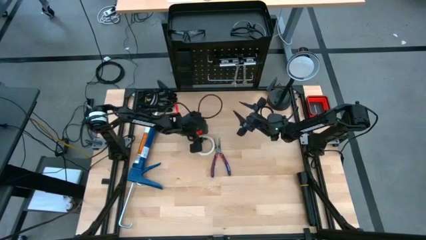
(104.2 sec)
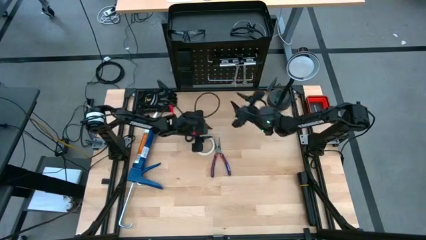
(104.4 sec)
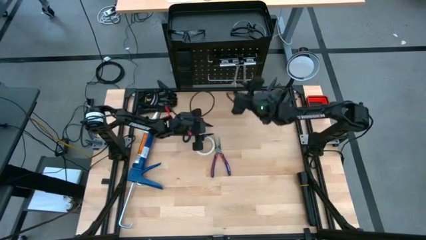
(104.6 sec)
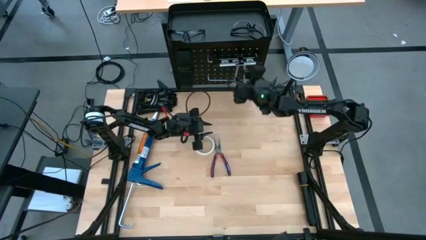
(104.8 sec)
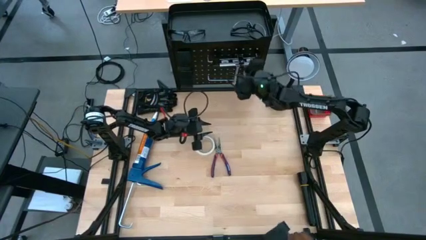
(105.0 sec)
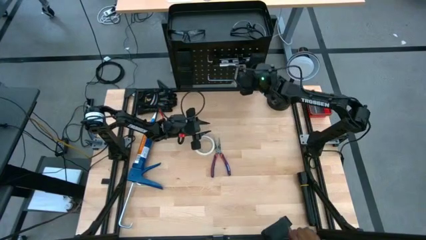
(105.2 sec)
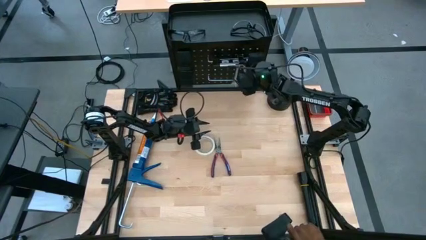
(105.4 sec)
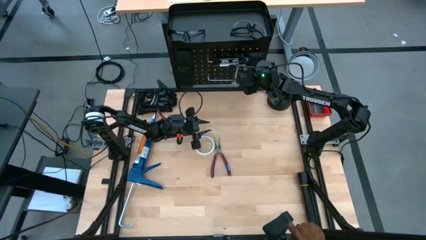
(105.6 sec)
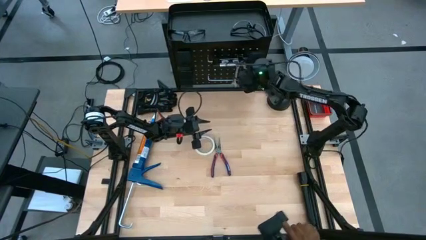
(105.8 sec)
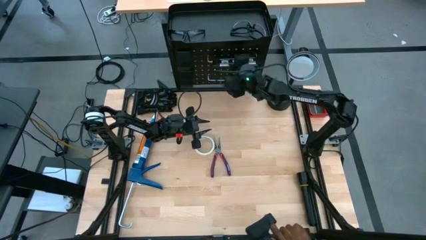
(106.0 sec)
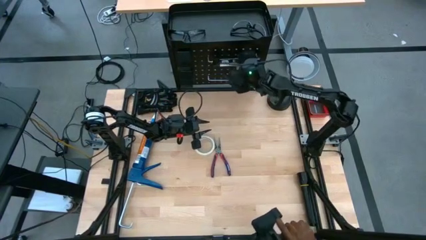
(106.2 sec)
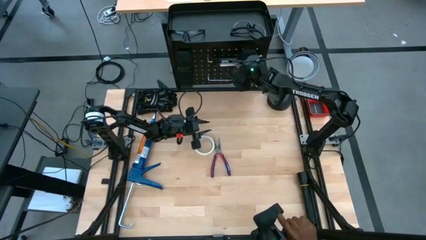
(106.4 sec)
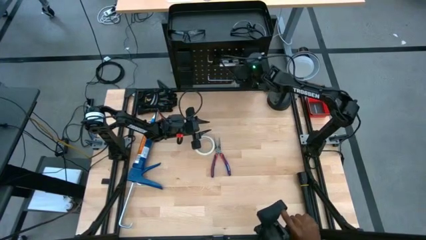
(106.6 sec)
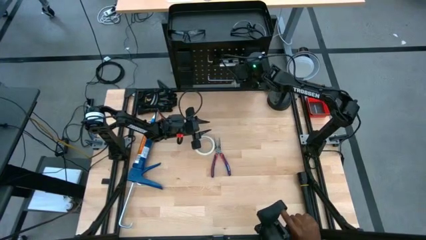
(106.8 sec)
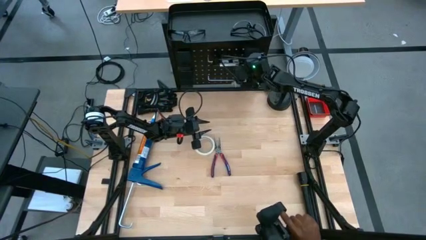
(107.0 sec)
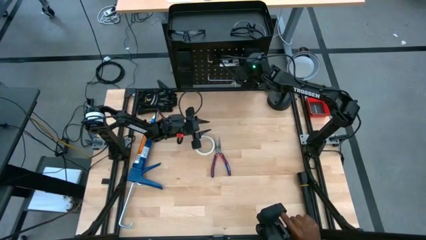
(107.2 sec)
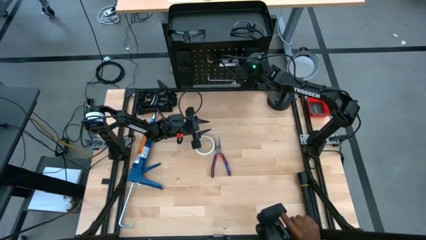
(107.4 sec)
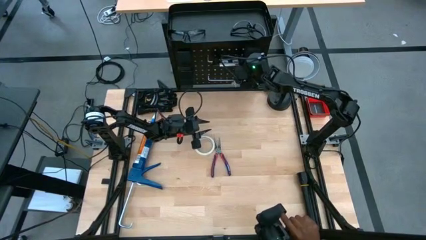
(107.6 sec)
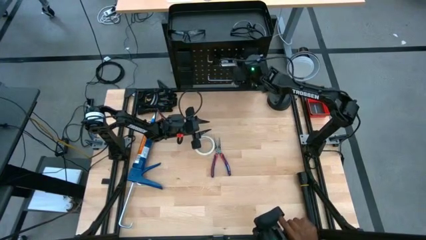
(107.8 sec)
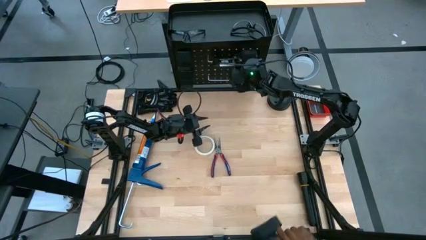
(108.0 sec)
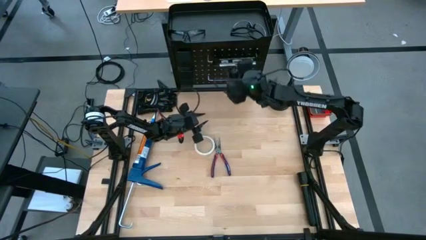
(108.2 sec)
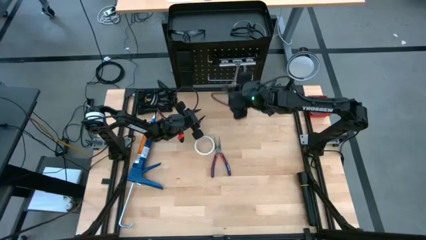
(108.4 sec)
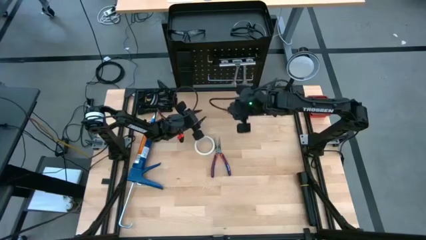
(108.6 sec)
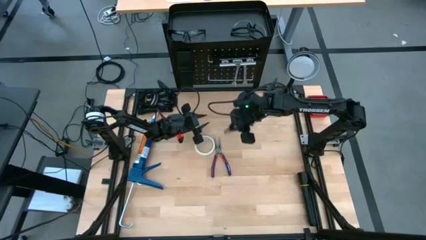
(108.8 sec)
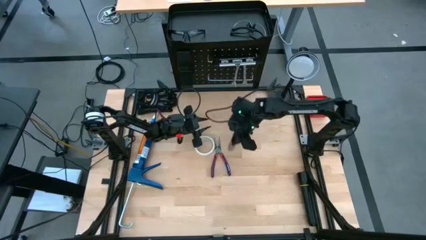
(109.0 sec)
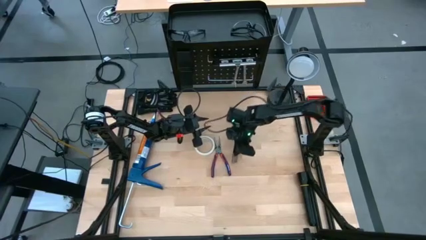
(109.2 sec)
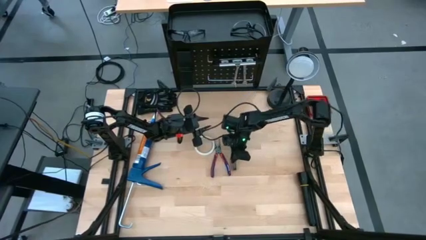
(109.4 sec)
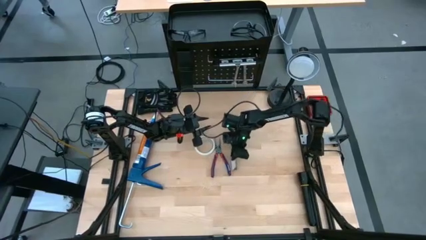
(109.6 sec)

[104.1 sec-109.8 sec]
Task: Hang tools onto peg board
Remove the black power balance handle from the black peg board

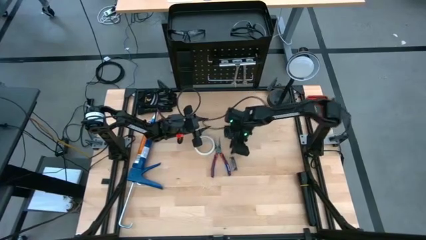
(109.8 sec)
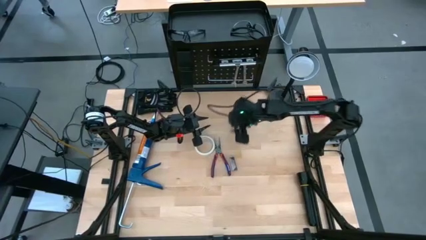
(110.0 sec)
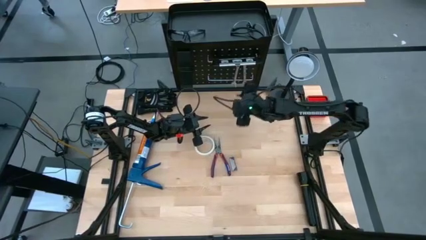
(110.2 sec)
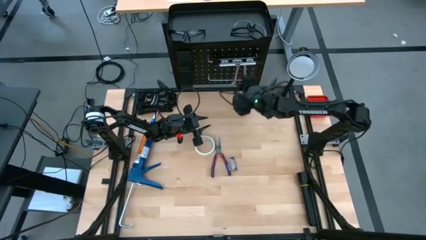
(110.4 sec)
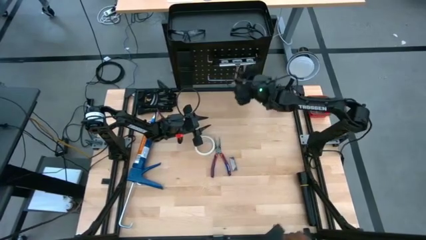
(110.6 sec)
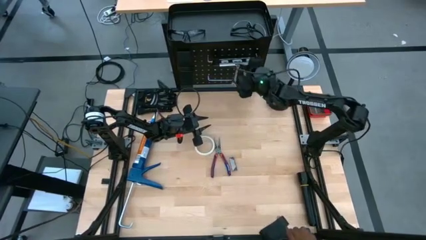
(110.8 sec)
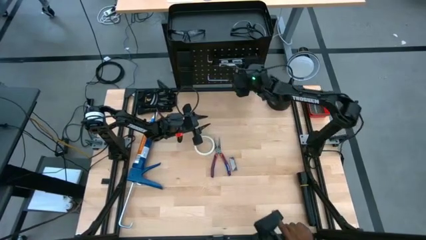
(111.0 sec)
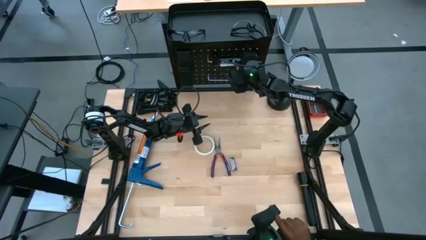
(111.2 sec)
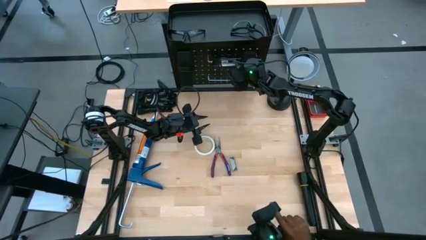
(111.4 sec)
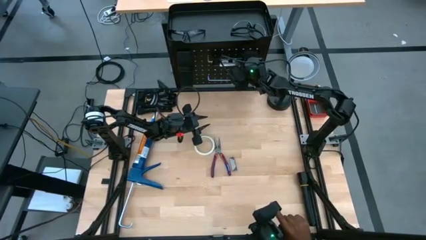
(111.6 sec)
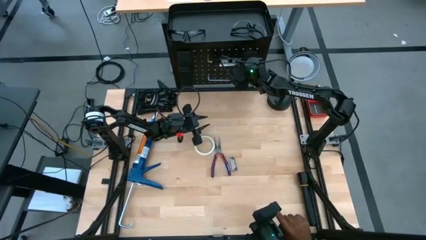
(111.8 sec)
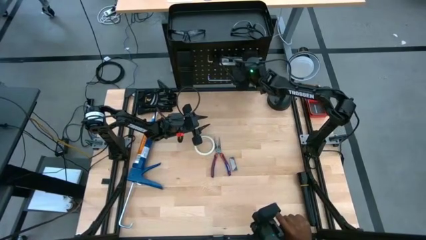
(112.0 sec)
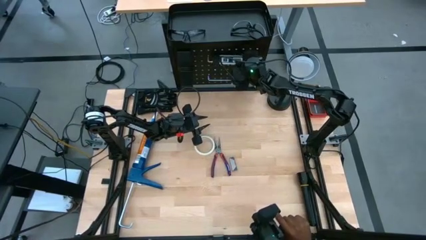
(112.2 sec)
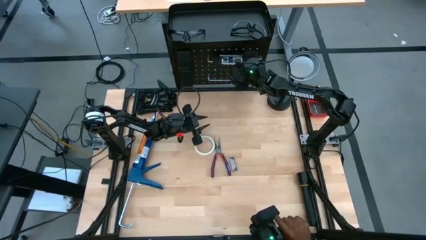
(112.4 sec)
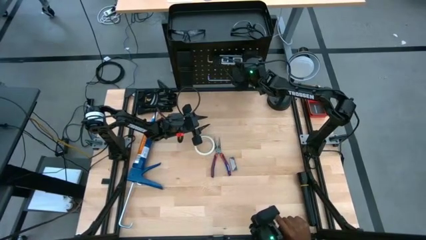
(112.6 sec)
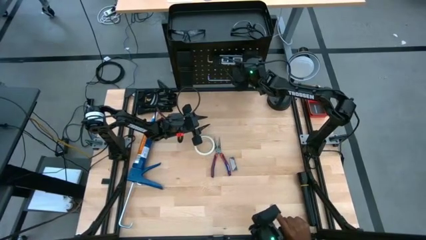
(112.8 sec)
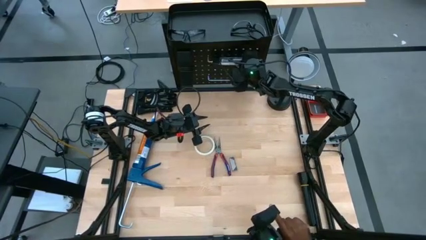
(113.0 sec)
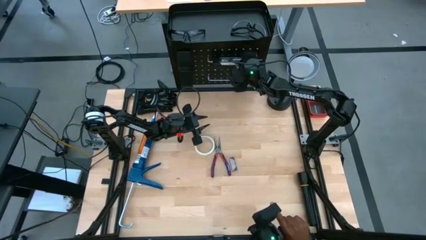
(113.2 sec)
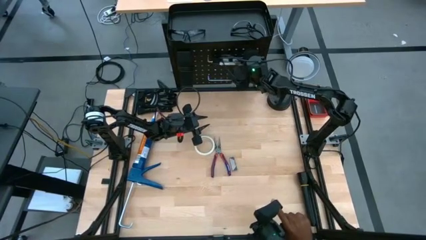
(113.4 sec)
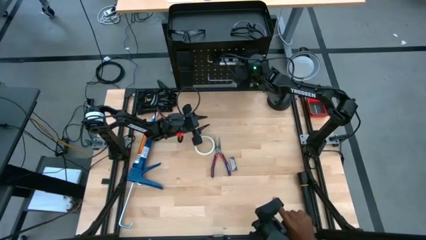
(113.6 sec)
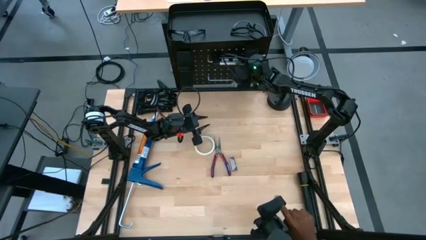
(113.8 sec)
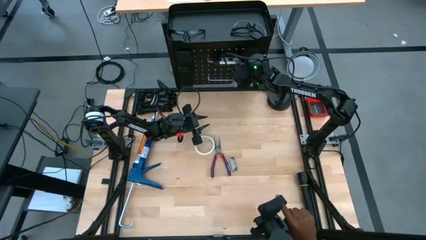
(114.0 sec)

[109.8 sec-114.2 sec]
Remove the black spirit level from the black peg board

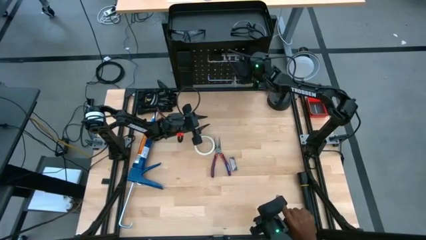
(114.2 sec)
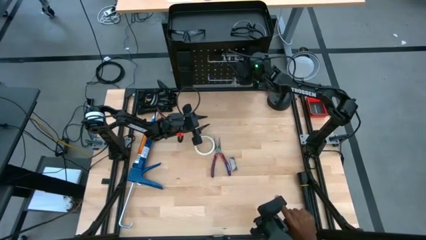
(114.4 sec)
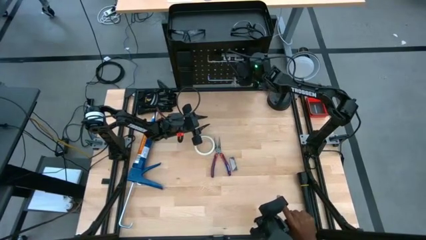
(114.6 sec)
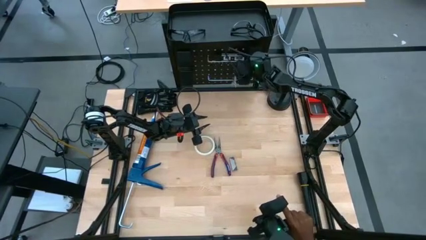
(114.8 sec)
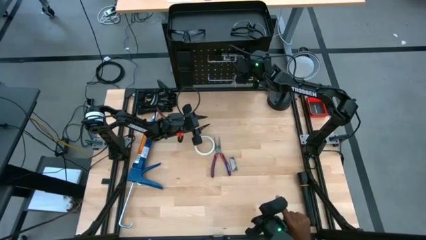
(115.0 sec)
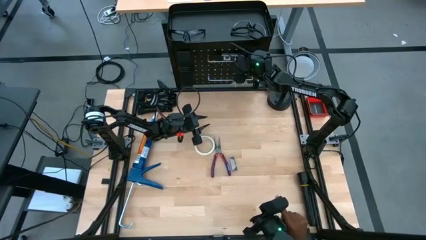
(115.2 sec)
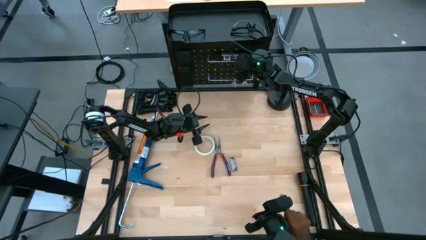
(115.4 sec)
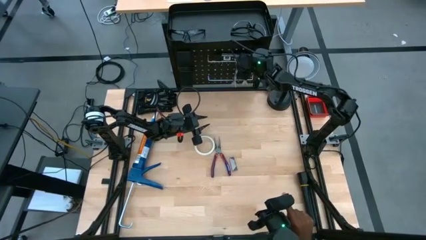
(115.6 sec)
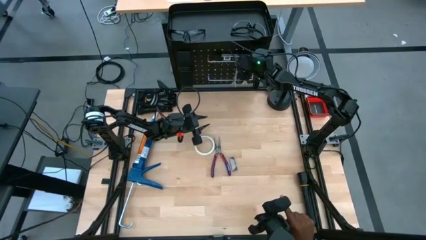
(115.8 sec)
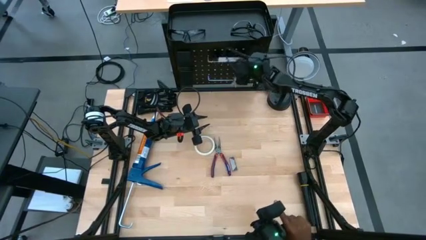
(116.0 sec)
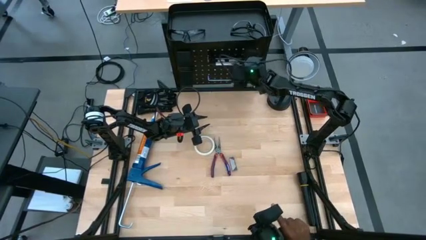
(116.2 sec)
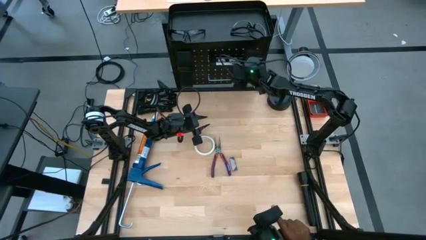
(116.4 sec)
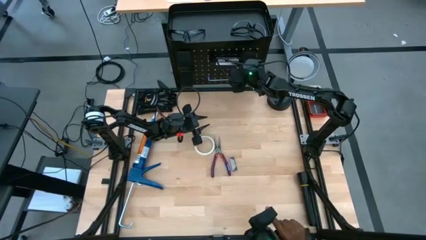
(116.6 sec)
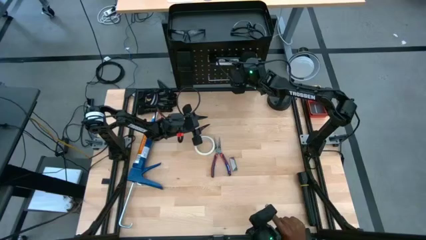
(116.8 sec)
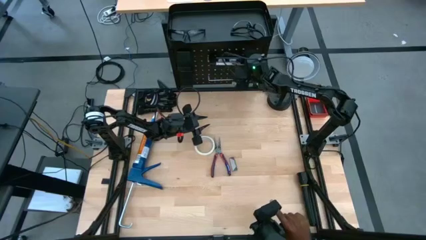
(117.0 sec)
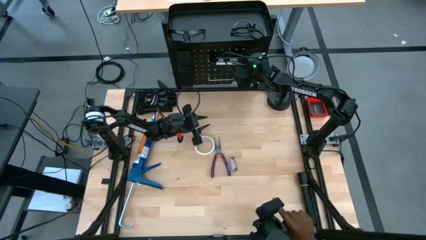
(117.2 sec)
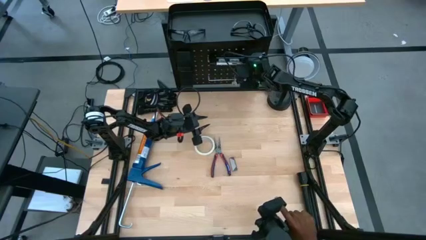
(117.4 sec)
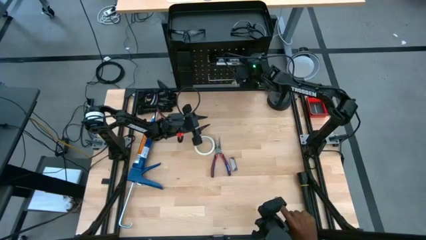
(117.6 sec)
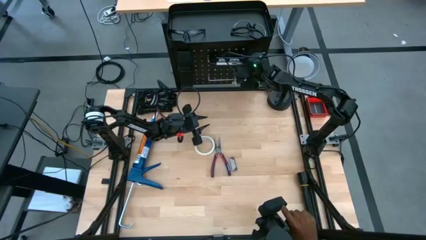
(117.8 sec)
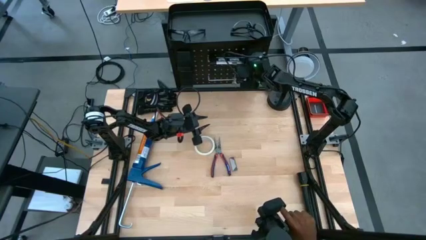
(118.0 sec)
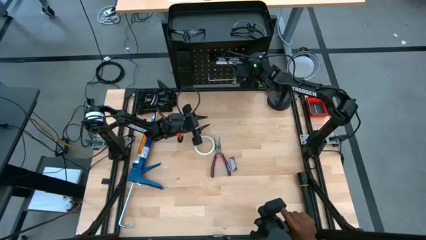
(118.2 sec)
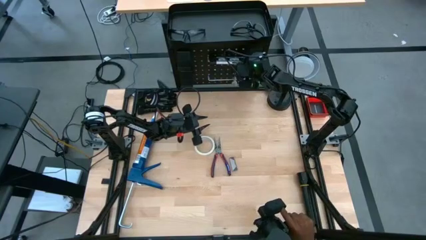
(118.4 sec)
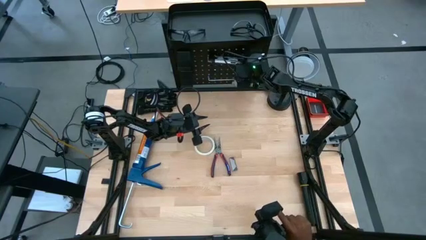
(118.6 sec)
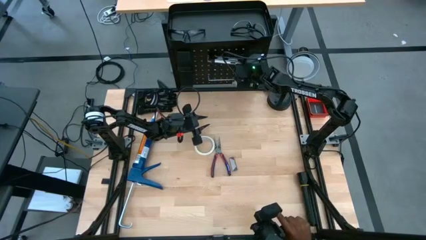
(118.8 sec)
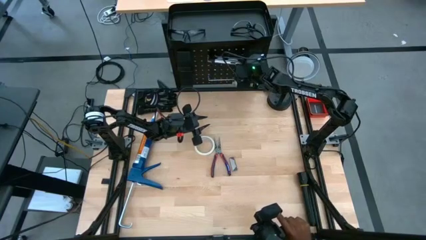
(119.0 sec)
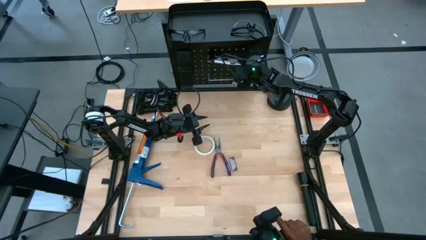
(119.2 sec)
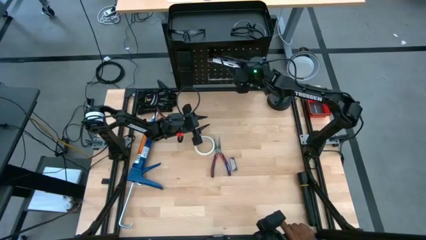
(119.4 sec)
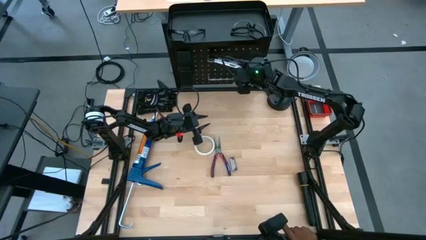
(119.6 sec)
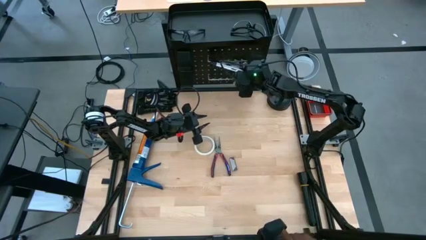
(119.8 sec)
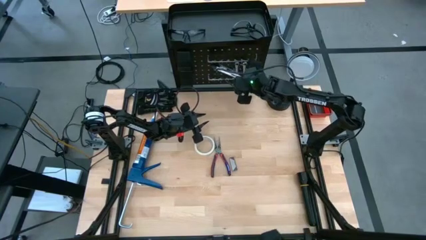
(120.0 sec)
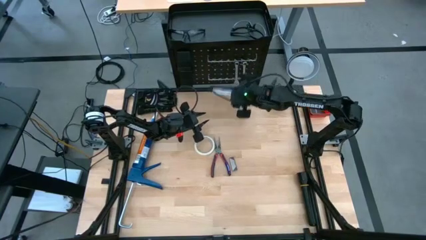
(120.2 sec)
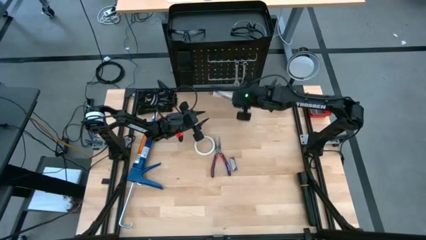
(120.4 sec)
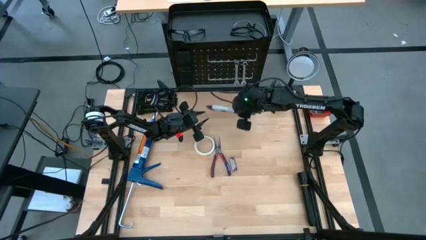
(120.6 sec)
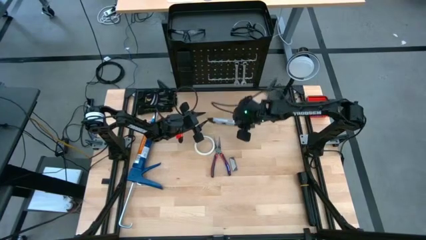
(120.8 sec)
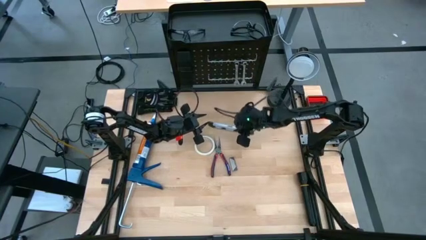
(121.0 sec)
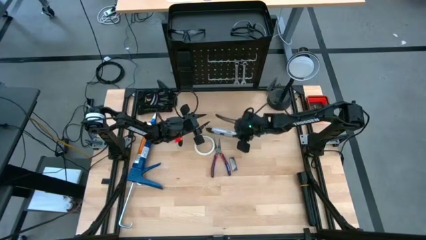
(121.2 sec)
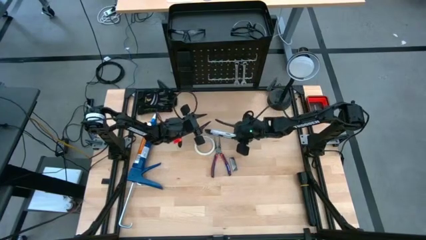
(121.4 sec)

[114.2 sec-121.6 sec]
Remove the black spirit level from the black peg board
